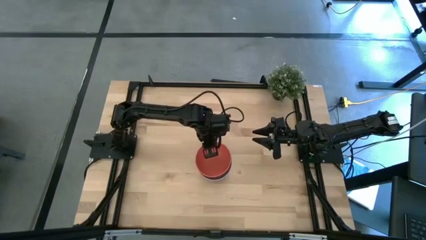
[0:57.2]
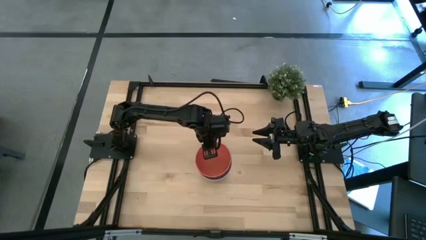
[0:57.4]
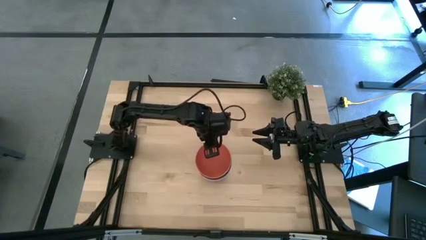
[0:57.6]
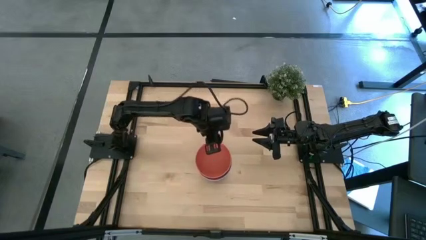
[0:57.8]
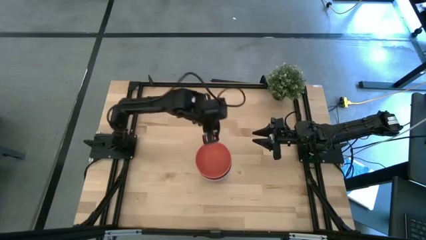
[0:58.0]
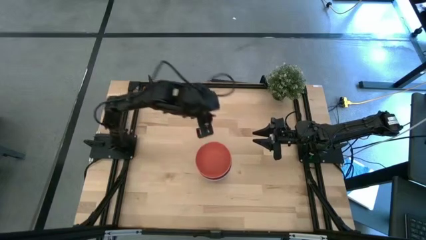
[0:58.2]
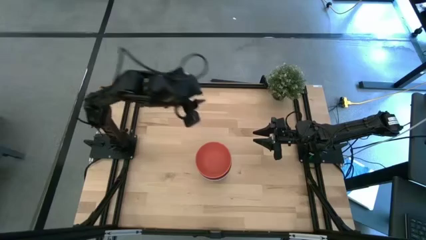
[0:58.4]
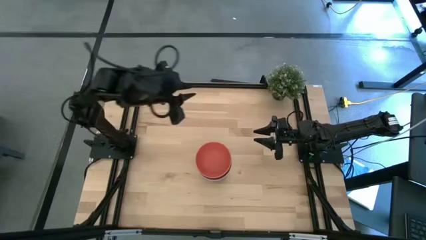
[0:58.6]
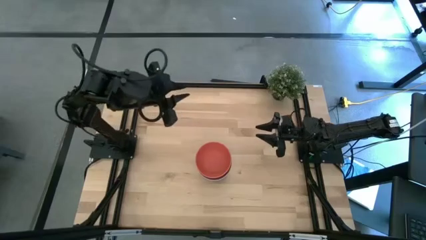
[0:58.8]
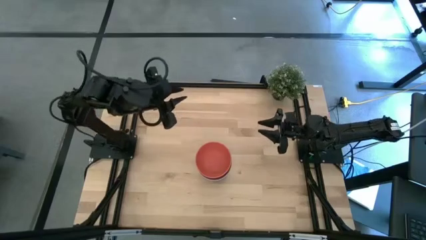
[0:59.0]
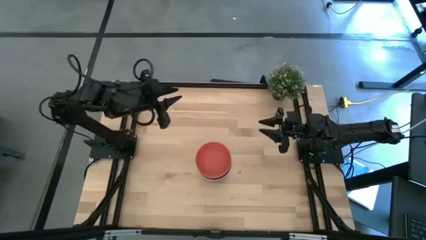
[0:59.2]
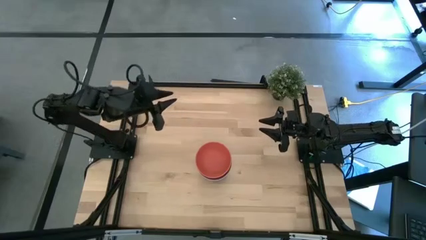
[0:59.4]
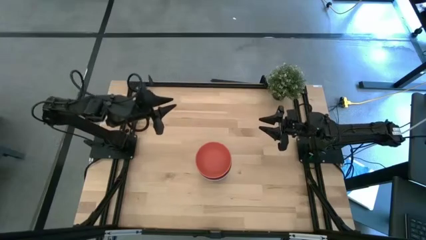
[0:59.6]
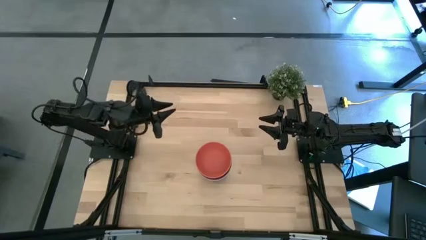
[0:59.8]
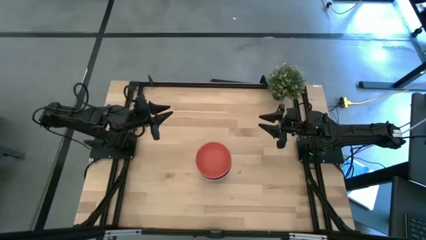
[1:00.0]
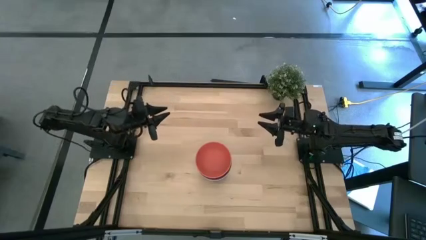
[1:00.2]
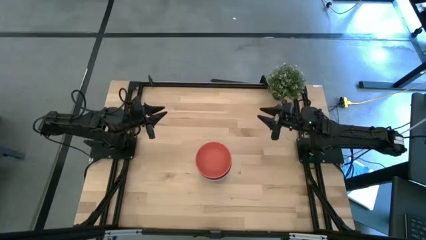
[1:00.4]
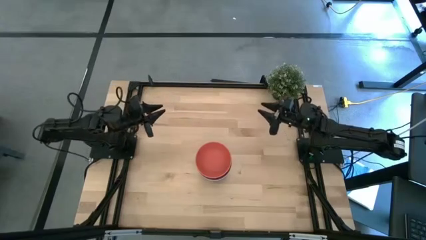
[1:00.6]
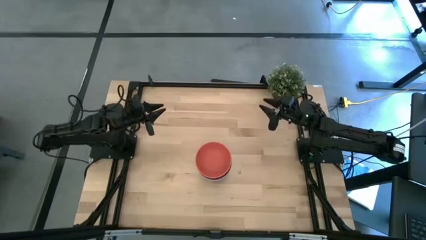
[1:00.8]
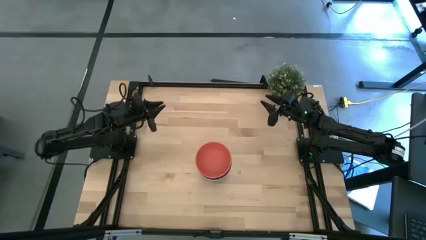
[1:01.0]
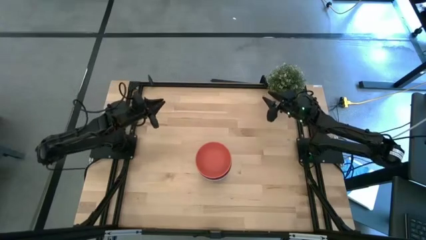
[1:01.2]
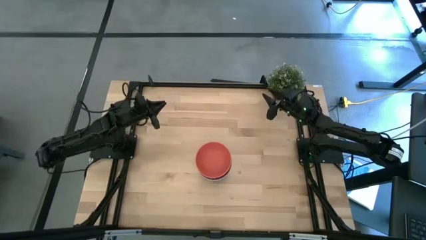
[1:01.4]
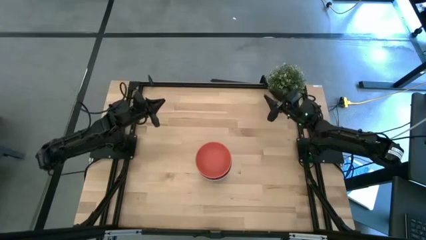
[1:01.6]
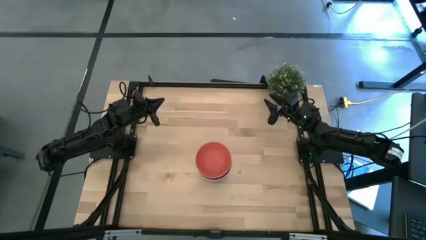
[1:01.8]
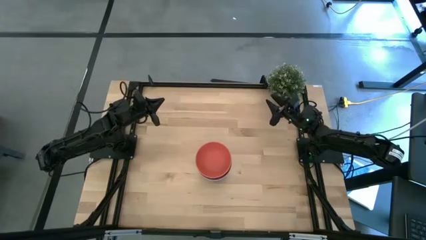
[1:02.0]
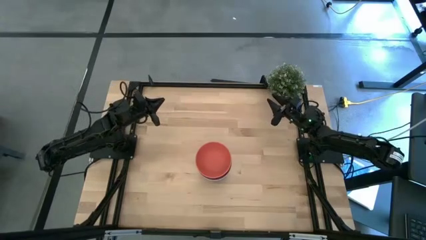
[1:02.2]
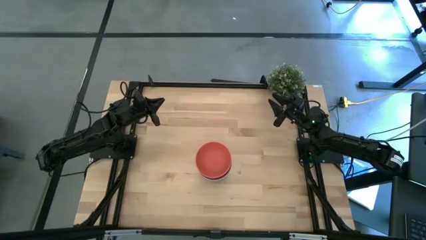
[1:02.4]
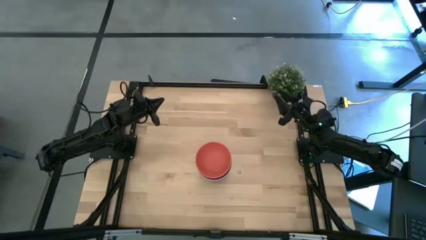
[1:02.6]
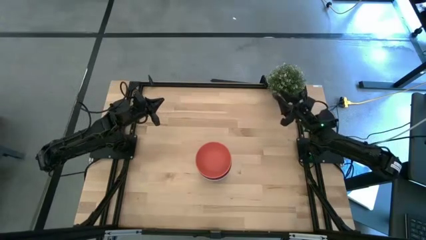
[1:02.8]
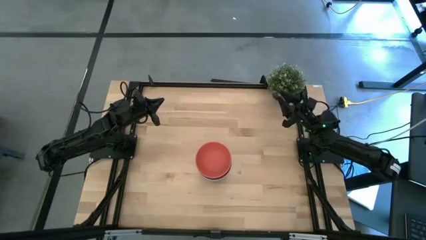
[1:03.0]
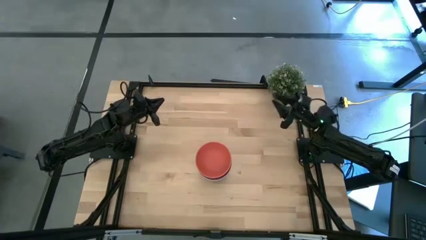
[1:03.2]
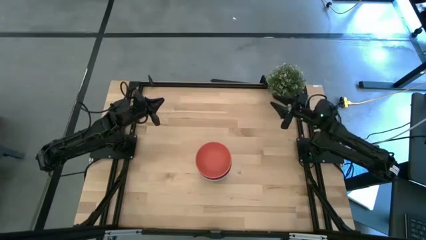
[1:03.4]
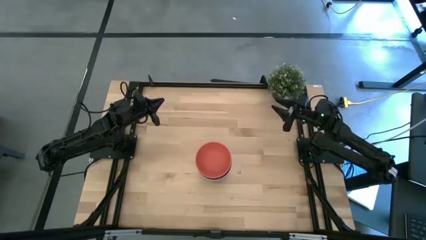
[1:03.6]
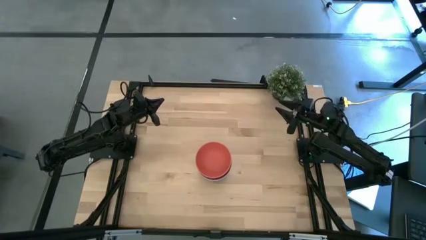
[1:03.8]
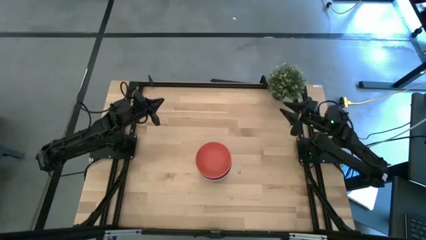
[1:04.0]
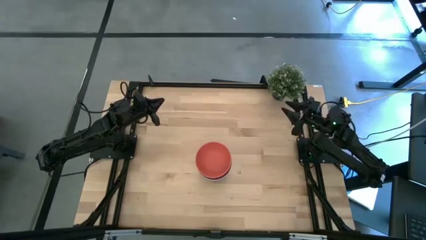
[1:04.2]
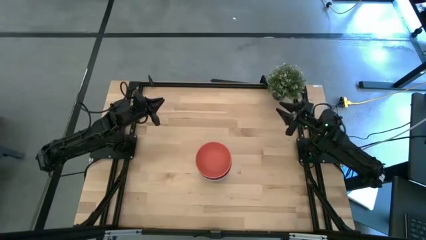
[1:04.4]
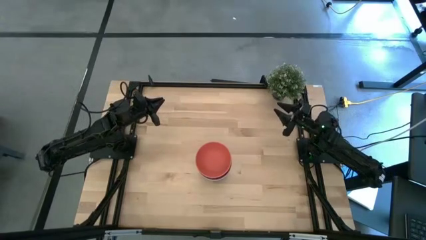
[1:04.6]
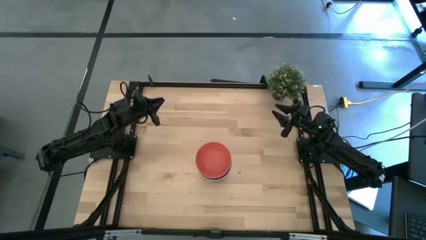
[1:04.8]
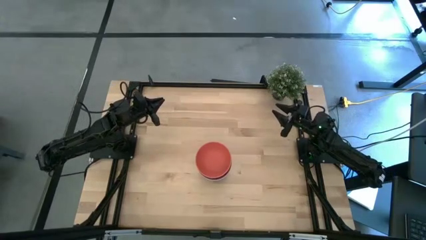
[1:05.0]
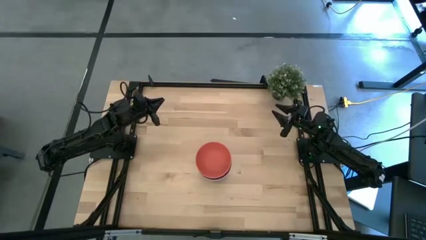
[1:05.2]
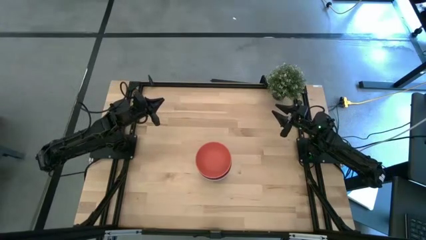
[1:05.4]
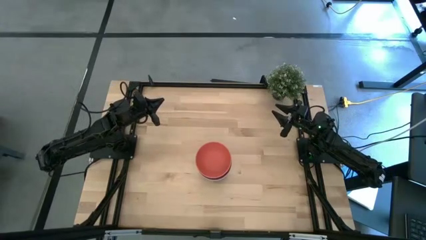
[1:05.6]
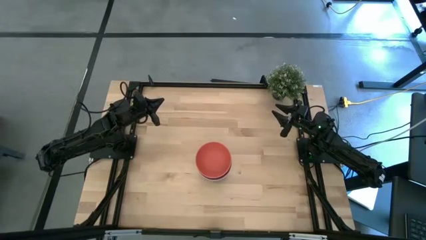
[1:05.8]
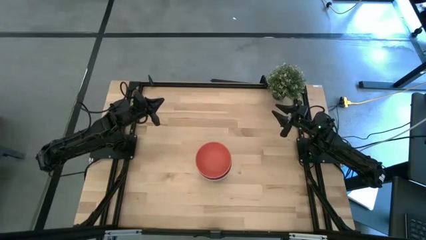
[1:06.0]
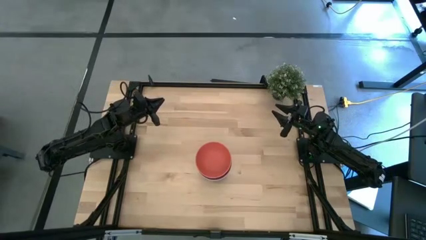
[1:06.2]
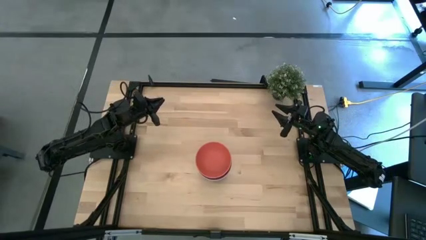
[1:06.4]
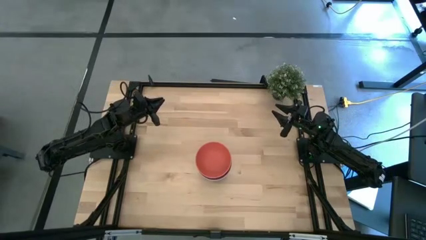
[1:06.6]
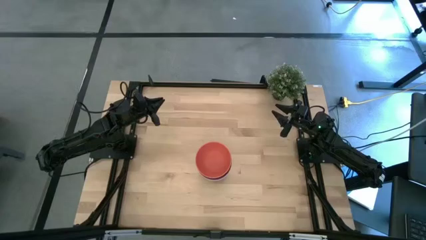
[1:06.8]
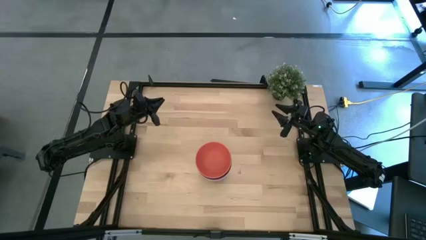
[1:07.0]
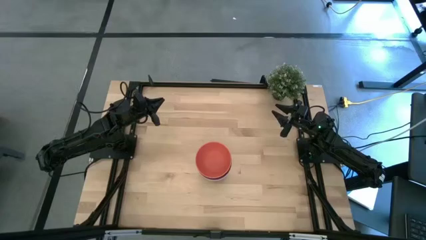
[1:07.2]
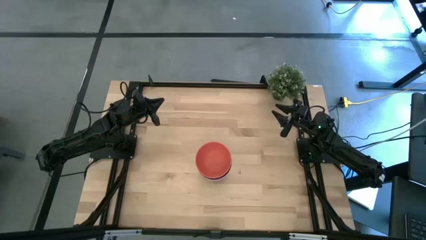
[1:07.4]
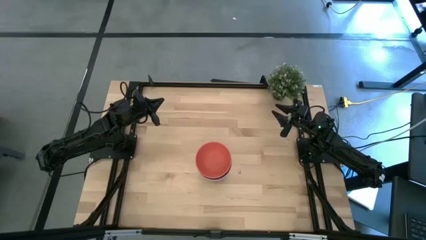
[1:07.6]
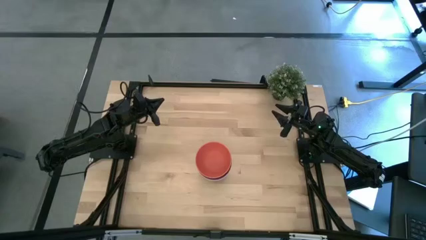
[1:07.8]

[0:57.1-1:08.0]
Task: Nest bowls inside each other
Return to Home Position

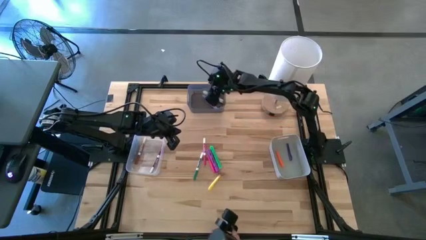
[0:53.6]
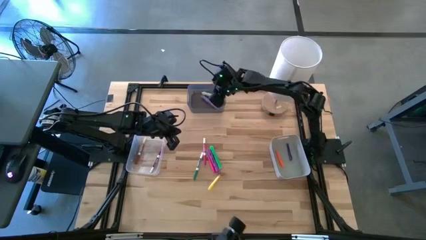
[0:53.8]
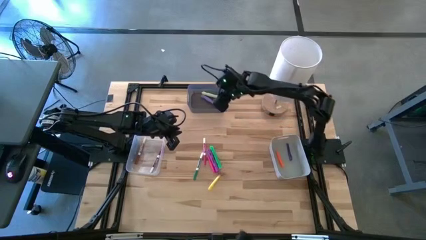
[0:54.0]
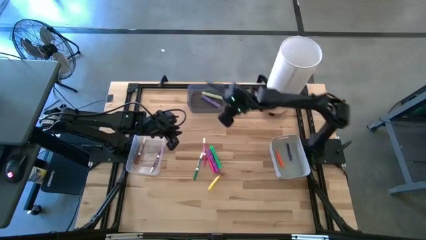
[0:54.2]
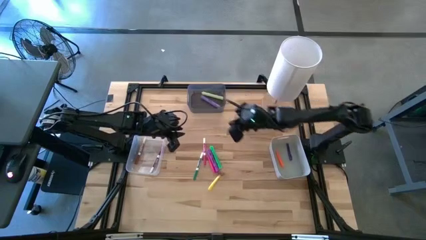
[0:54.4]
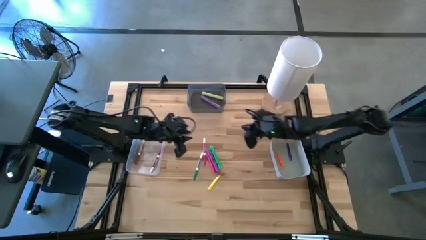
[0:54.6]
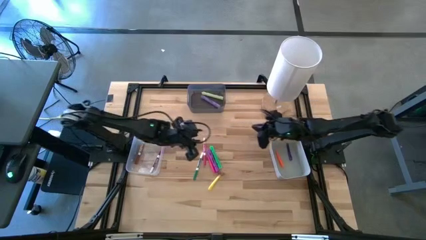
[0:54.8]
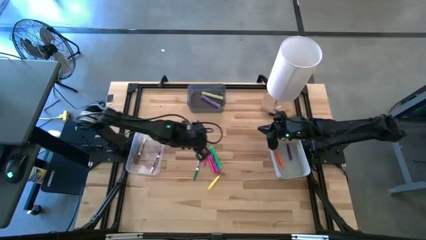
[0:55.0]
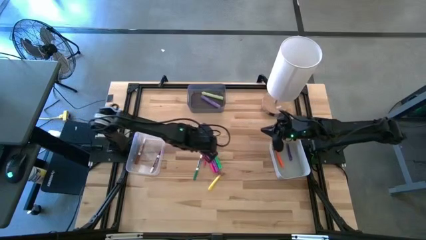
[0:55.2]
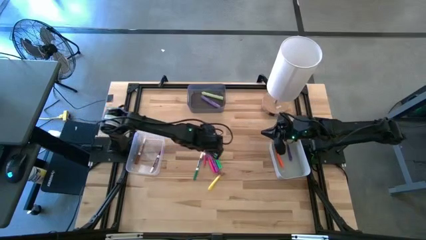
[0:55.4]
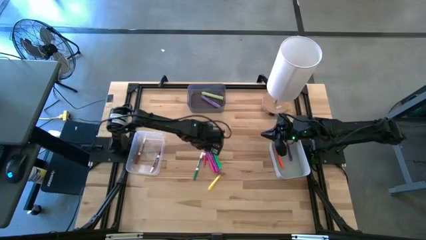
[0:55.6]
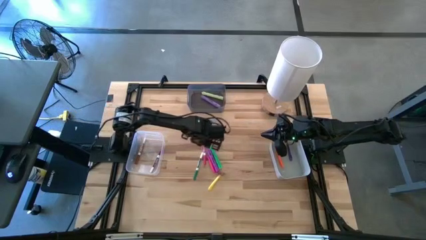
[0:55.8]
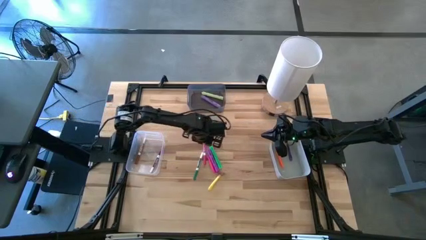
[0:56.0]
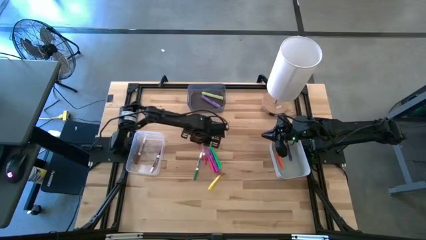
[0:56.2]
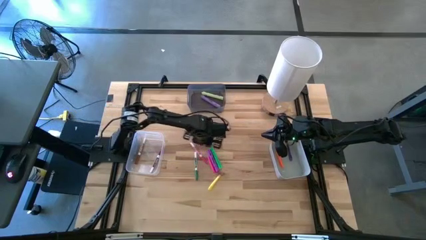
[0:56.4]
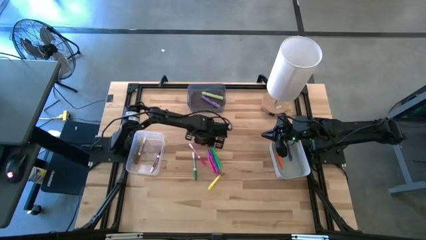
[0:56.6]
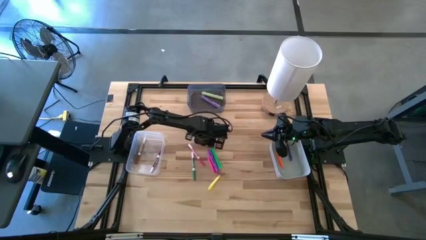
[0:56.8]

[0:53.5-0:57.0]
Task: Pick & Place Markers
Put the white and pink marker into the transparent bin

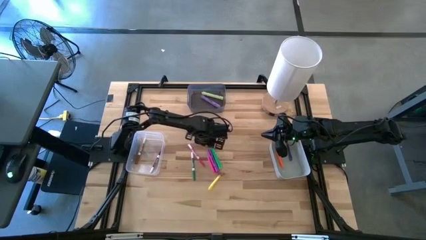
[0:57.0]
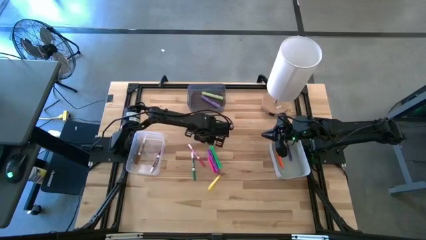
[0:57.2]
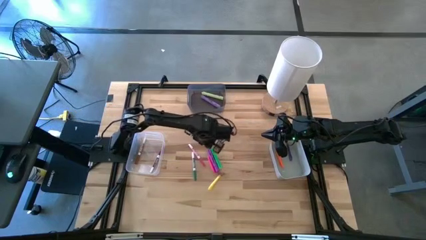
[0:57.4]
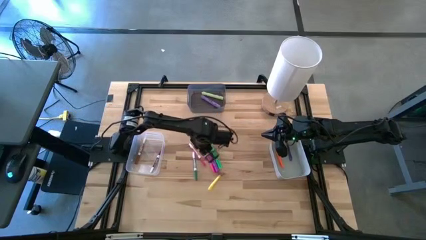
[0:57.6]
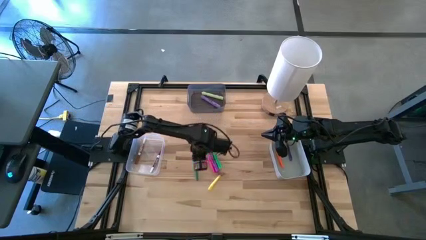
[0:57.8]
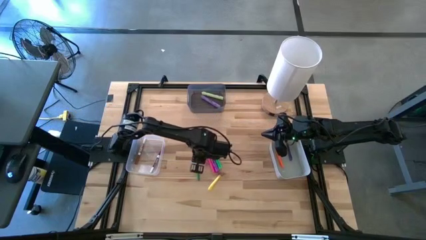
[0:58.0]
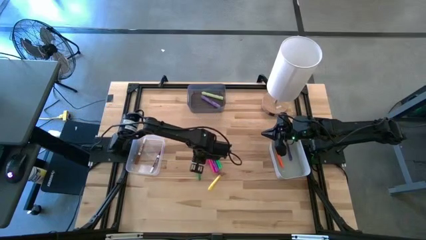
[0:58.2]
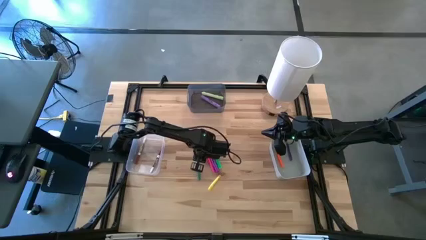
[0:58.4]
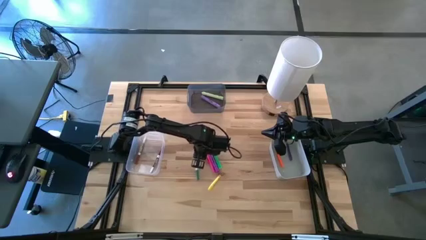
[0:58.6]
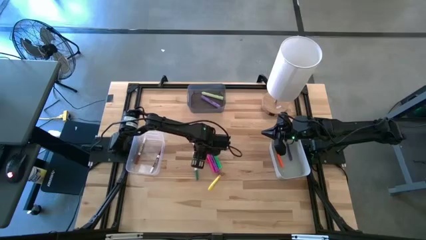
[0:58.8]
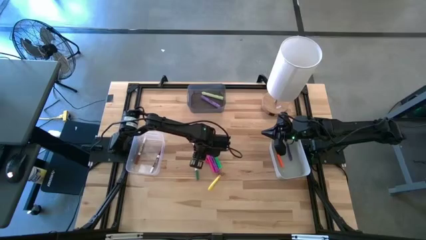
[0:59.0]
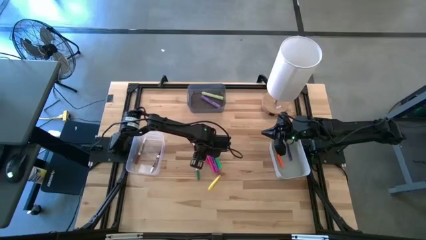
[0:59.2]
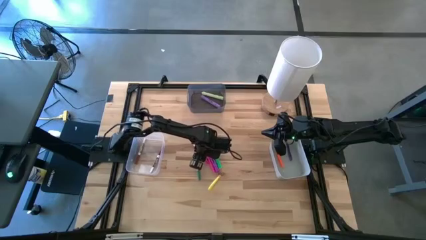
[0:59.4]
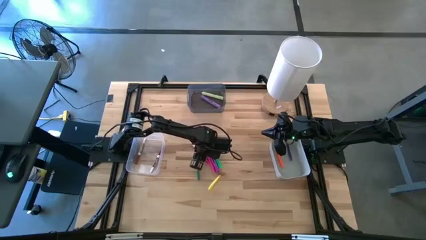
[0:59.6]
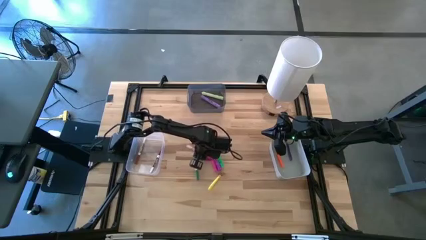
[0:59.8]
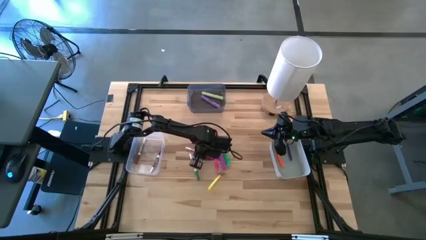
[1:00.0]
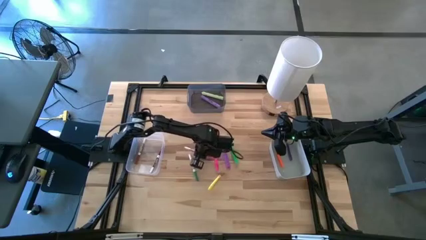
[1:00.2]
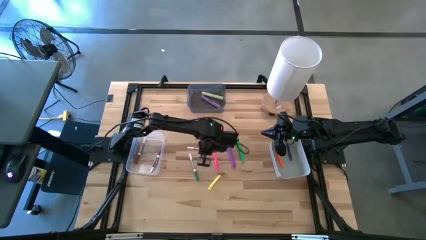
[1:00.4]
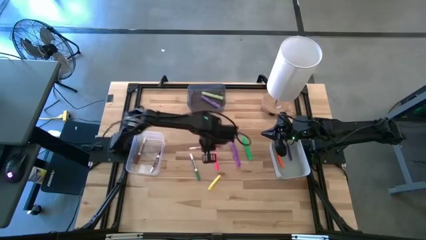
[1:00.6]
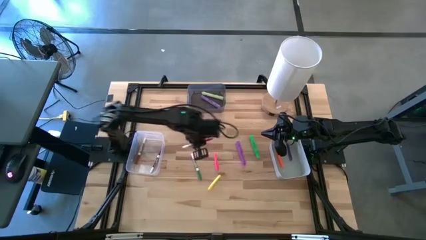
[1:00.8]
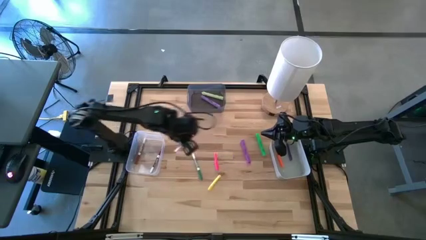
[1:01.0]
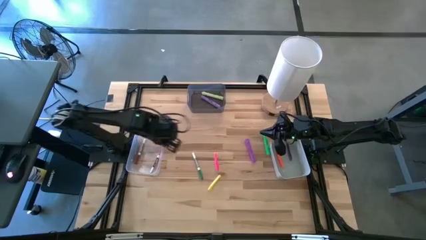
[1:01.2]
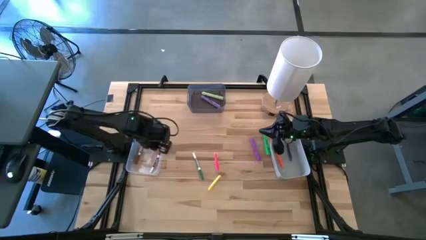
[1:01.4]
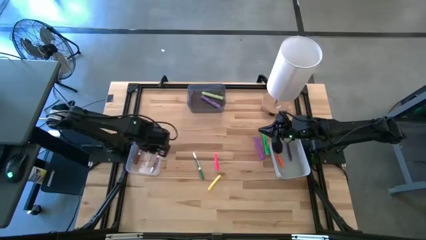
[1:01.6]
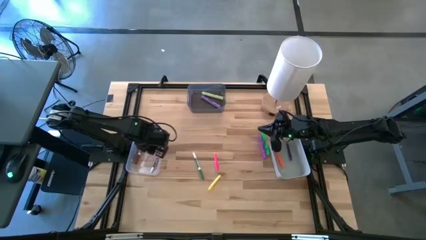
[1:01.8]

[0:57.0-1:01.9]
Put the white and pink marker into the transparent bin
